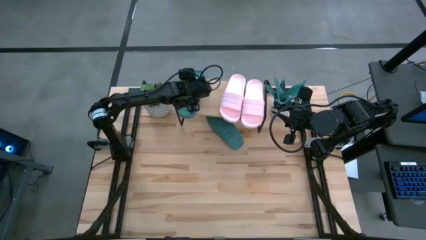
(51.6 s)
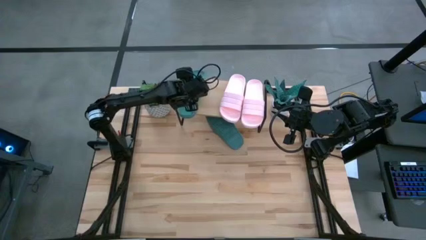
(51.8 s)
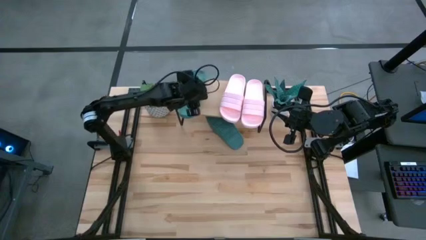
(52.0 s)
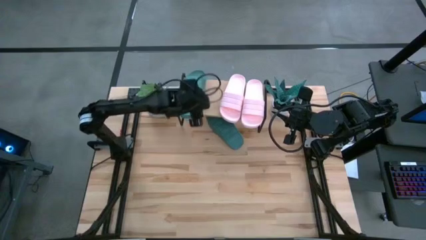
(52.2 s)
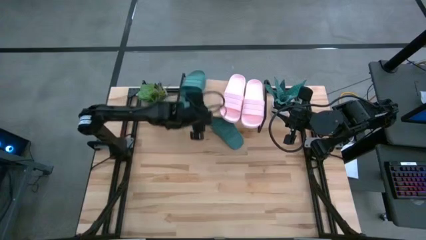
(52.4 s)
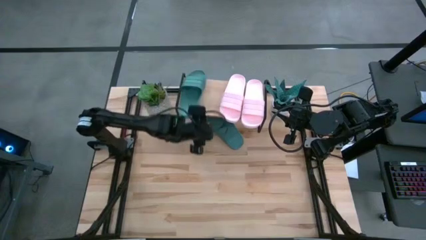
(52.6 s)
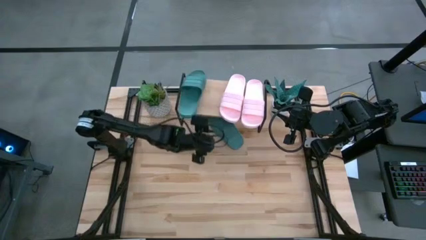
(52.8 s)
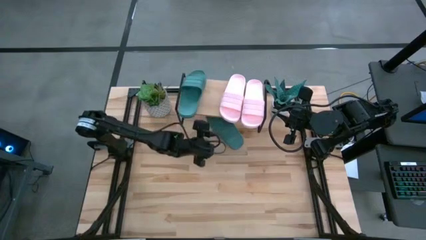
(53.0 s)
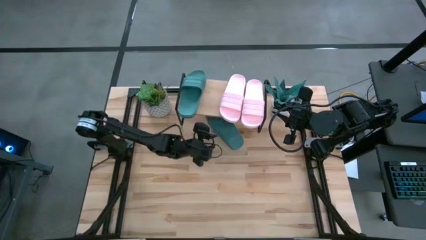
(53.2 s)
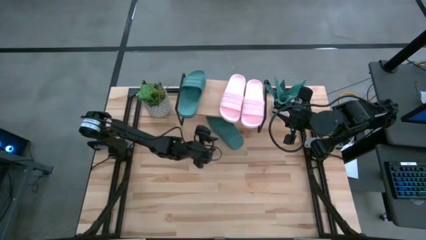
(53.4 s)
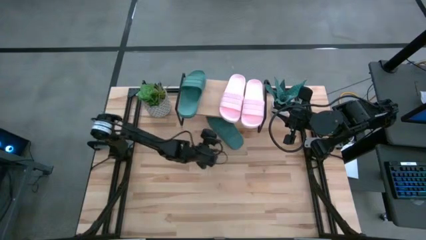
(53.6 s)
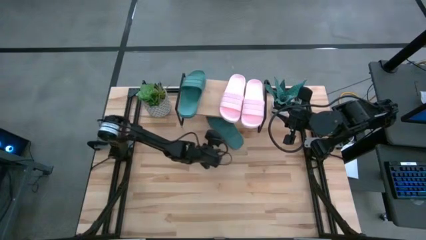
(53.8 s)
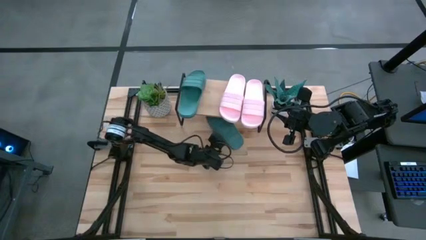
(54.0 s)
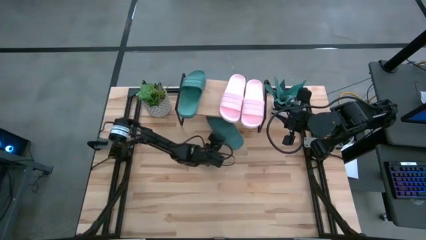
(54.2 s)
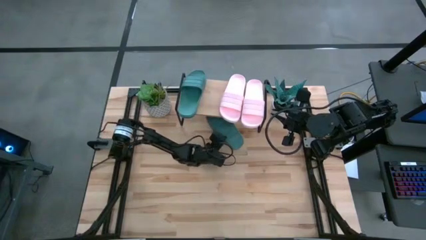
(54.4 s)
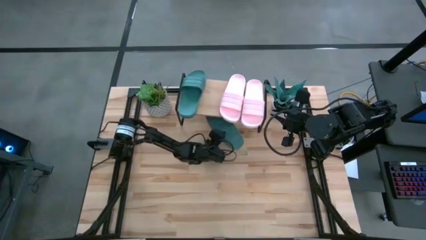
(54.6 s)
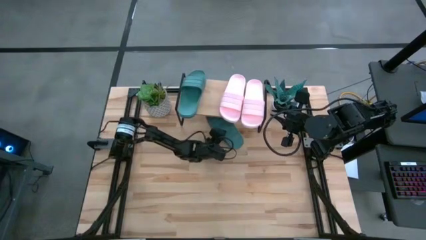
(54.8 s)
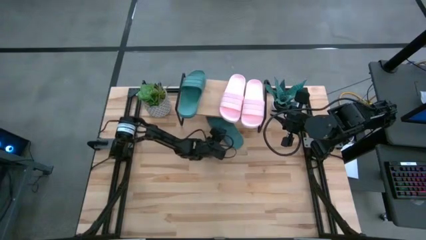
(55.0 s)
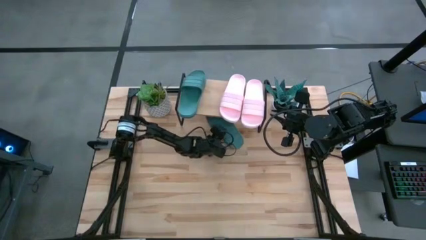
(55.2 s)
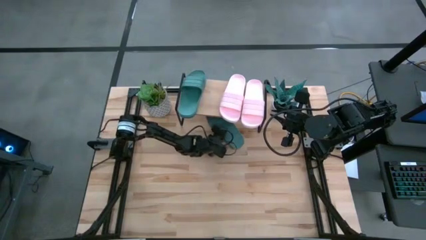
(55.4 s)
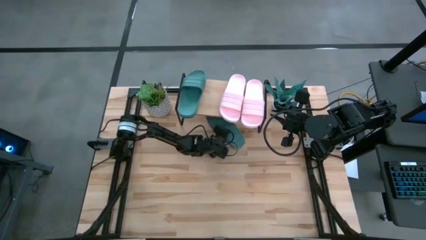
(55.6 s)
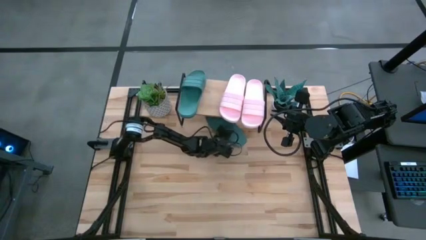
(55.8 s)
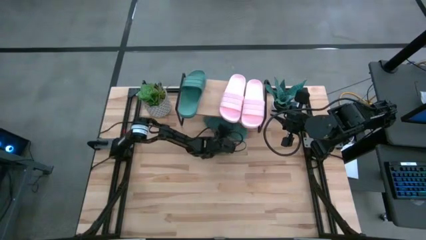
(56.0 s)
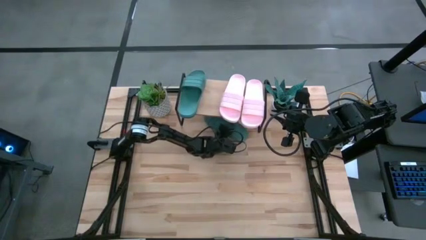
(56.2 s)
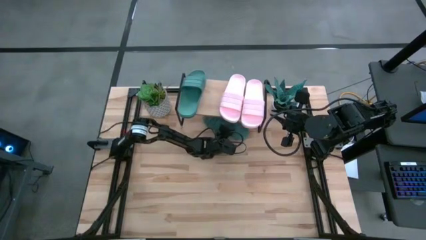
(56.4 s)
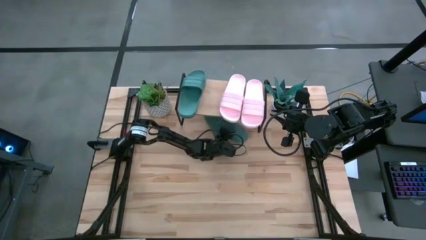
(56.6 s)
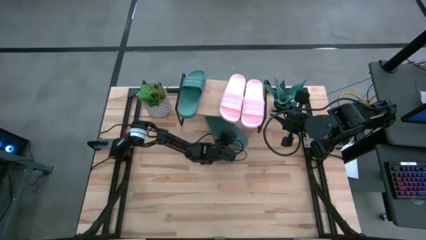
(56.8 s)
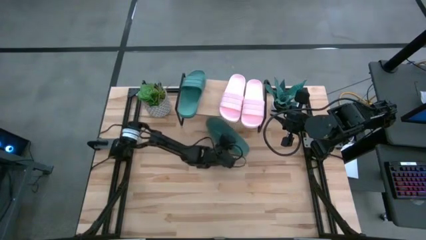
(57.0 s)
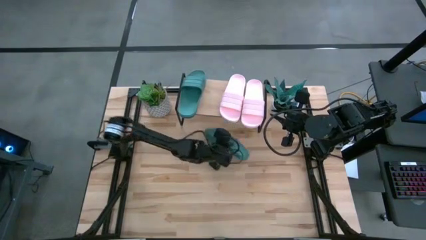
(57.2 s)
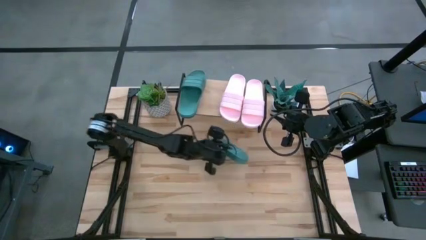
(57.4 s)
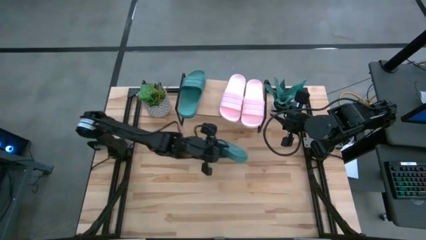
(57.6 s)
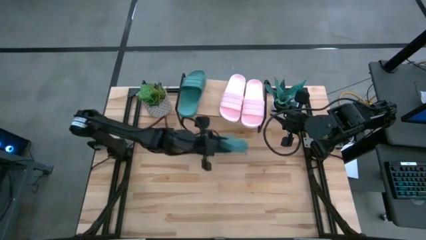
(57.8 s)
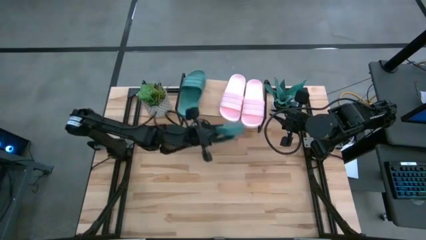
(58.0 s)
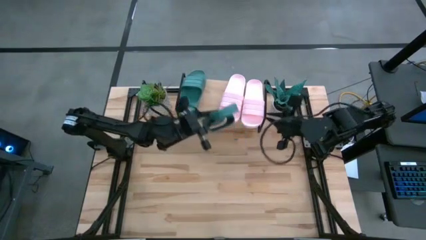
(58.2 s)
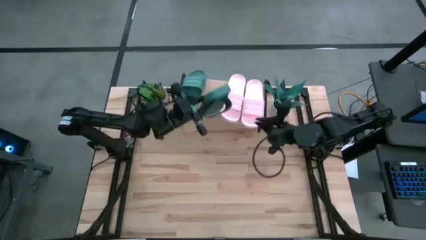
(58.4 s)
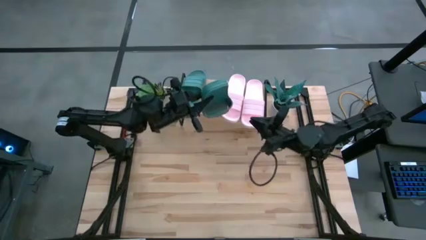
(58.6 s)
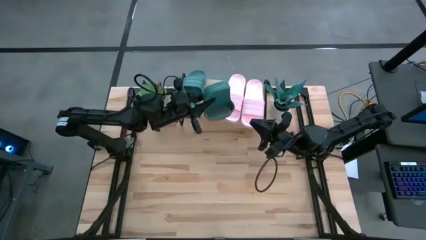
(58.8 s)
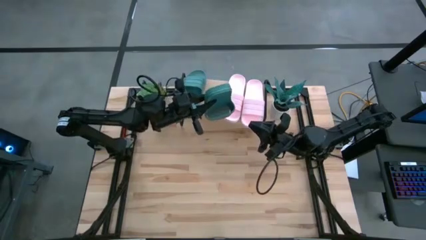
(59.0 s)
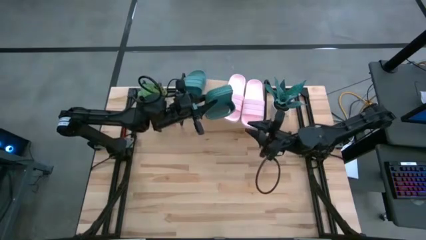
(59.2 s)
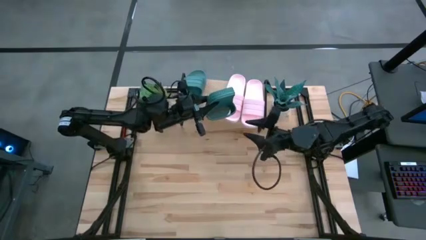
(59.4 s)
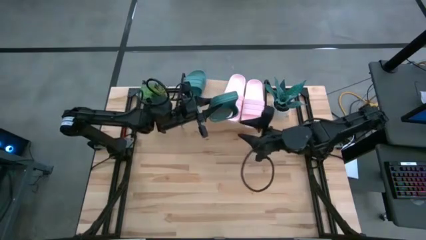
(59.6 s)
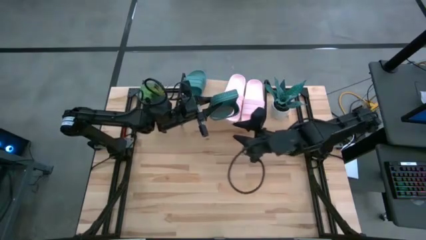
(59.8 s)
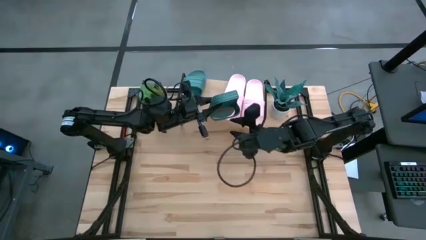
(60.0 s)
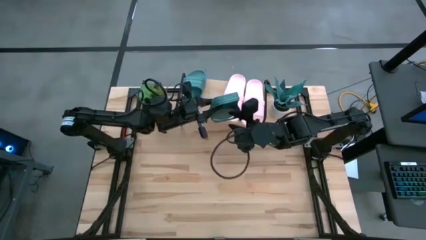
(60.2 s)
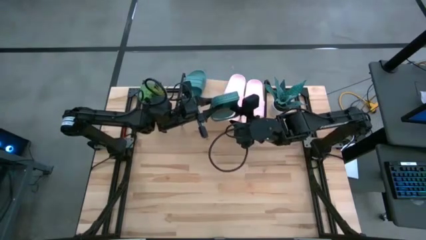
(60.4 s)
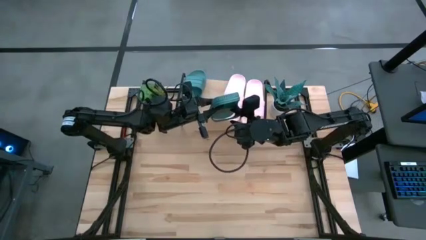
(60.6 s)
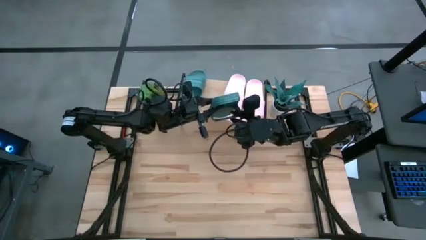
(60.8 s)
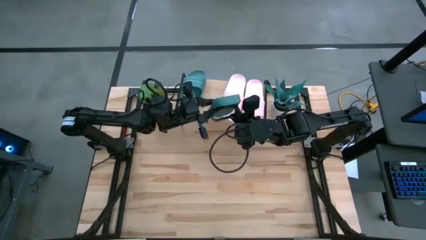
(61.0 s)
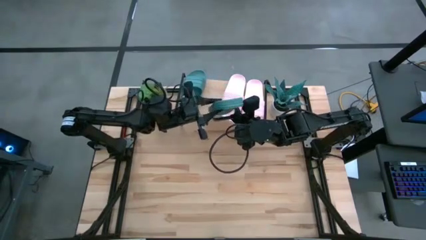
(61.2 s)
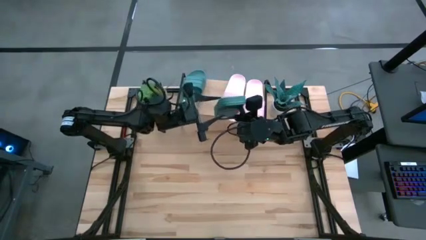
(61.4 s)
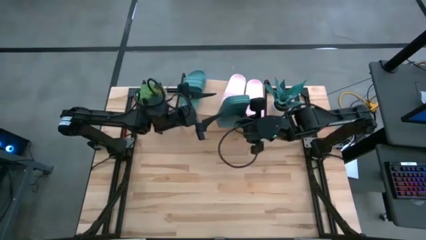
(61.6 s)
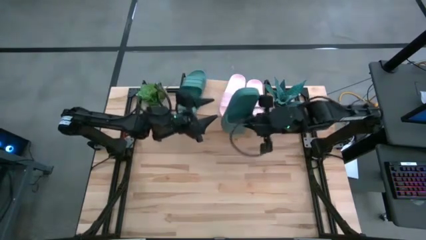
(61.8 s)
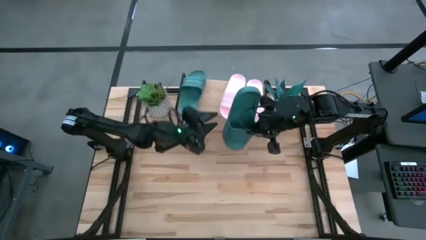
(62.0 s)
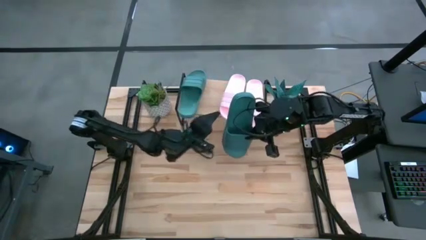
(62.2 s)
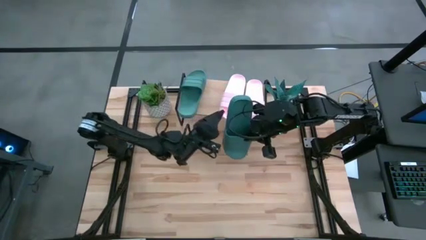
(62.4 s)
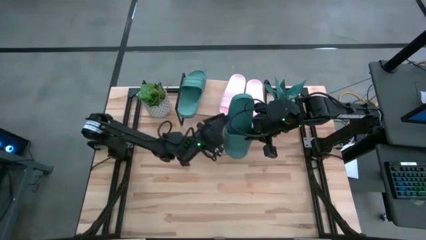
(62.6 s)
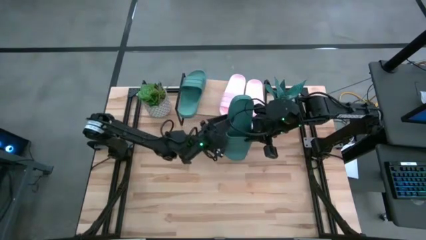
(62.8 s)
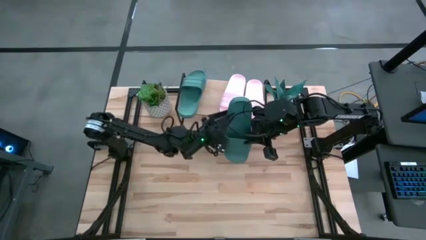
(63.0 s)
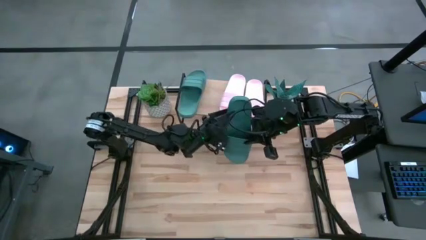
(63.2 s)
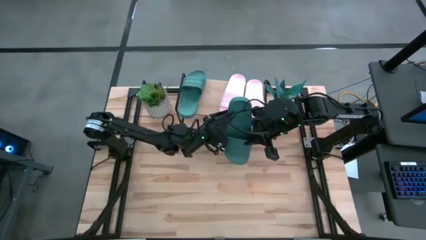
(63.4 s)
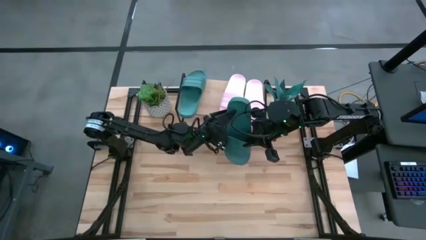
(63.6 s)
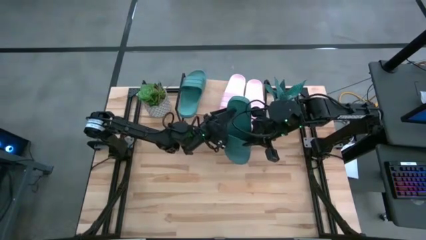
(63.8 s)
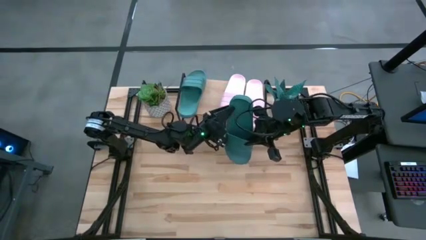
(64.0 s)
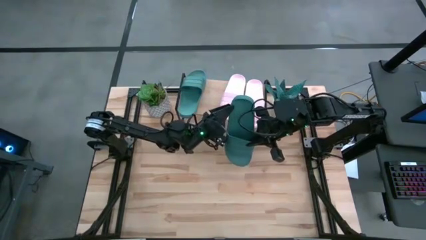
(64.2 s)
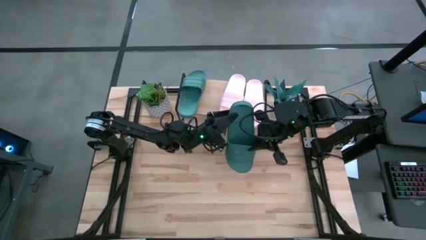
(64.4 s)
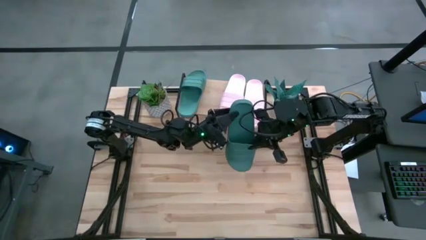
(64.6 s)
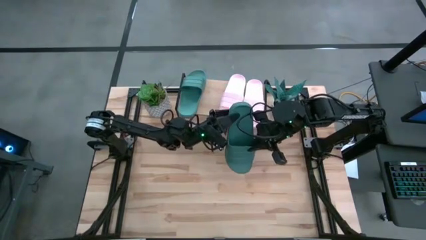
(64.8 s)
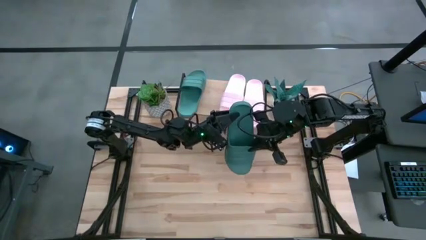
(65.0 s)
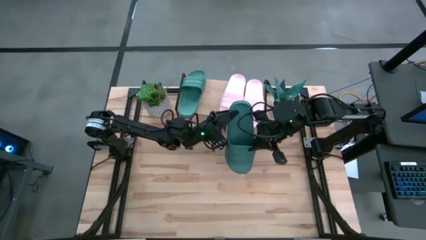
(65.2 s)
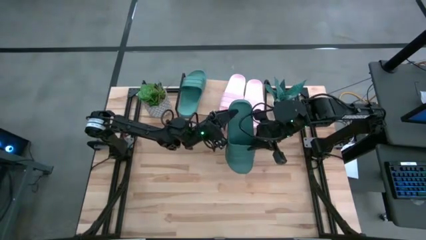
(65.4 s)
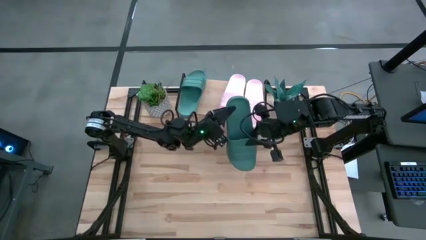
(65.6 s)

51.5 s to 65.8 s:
Task: Pick and place slides into the shelf
Put the blue slides on the shelf

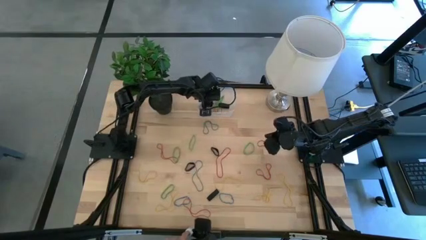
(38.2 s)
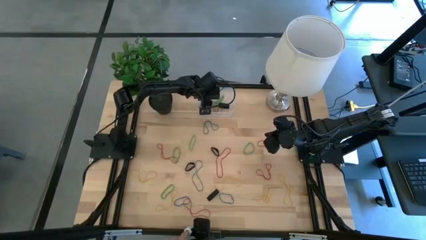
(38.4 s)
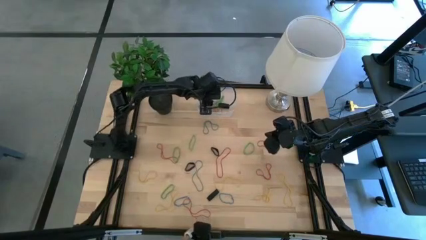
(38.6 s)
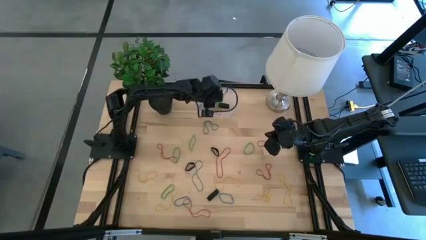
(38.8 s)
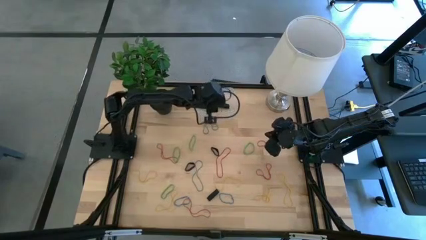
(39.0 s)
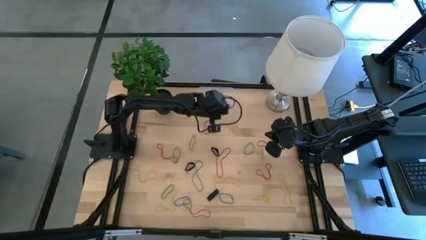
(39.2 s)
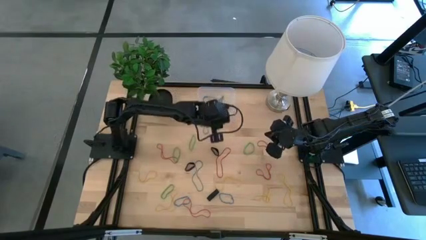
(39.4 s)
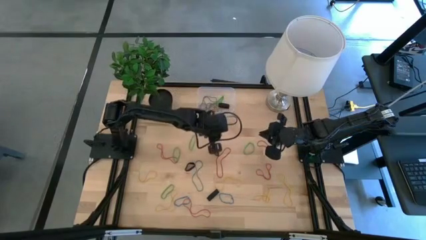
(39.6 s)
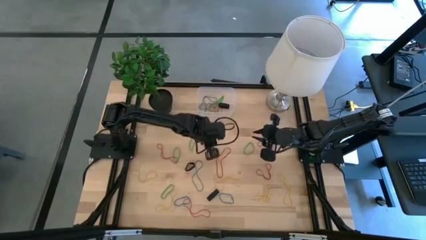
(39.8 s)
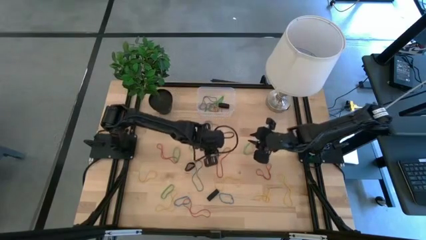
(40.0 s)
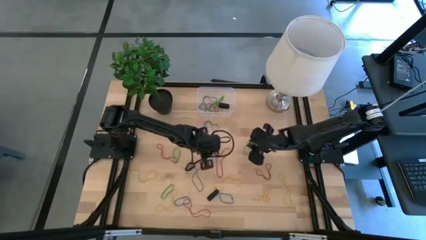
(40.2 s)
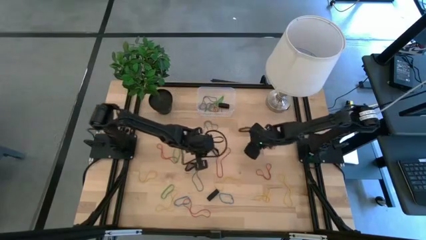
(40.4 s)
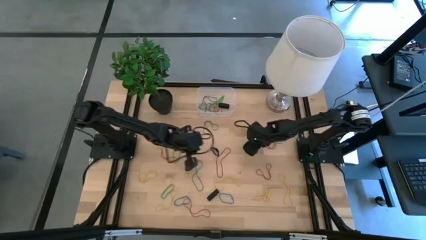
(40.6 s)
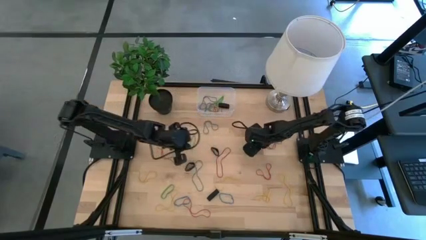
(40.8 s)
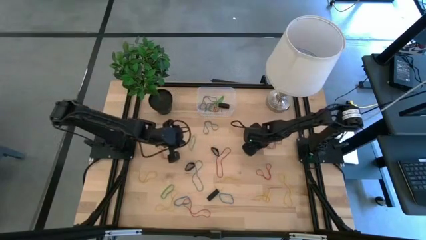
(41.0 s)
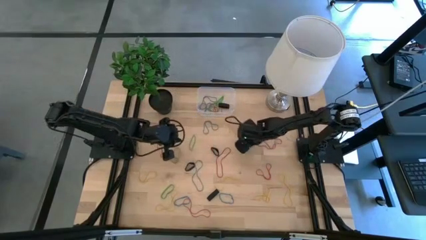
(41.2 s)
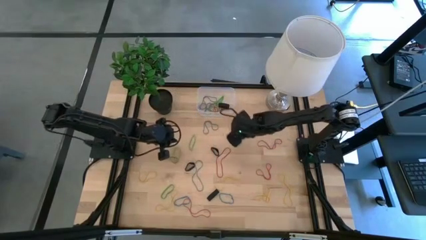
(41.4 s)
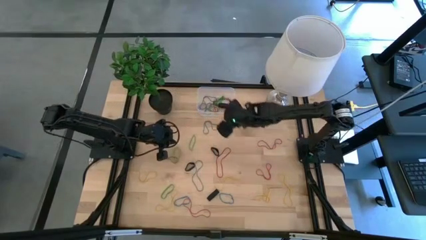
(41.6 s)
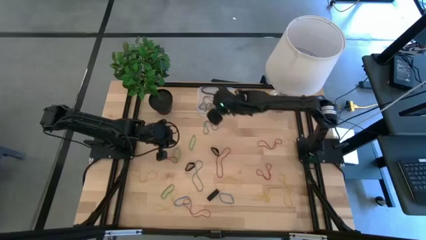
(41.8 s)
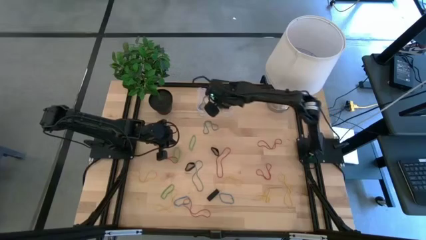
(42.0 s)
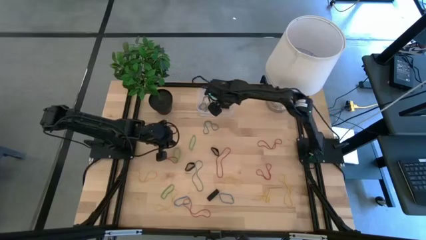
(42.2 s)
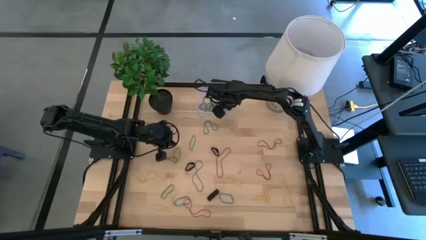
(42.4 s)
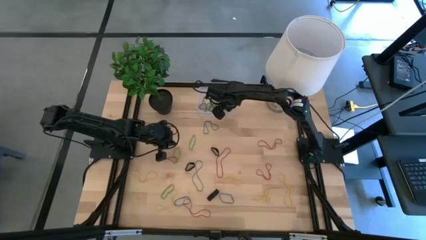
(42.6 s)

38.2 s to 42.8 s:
Task: Pick and place rubber bands into bin
Put the green rubber band into the transparent bin
